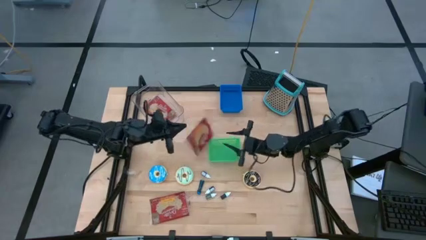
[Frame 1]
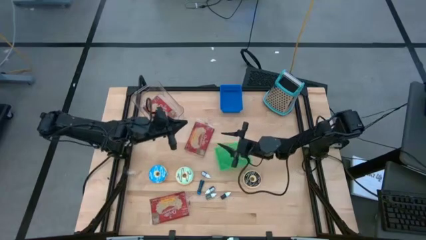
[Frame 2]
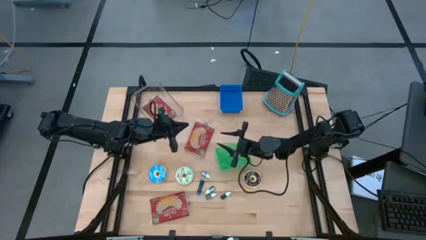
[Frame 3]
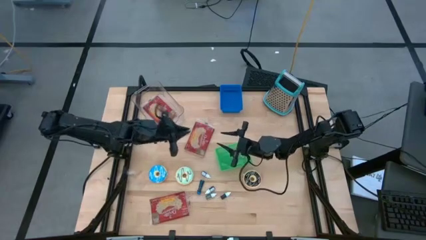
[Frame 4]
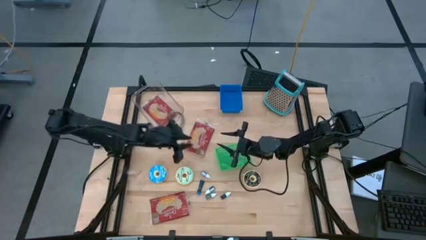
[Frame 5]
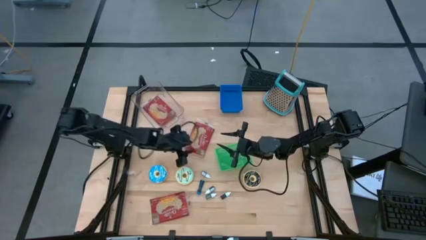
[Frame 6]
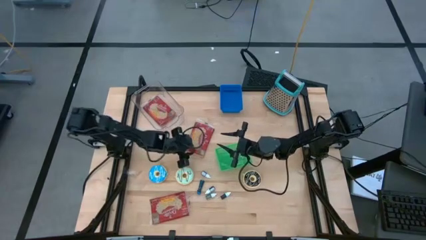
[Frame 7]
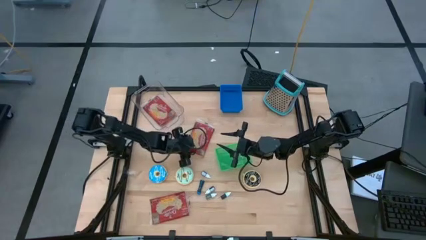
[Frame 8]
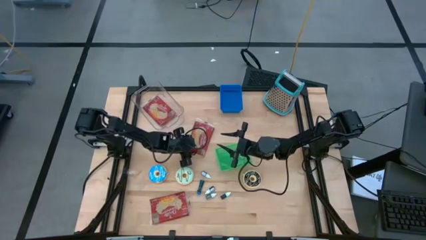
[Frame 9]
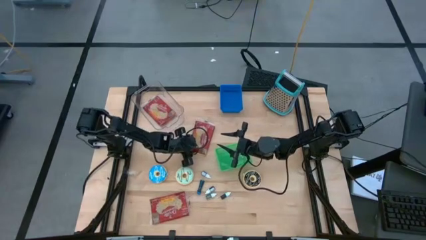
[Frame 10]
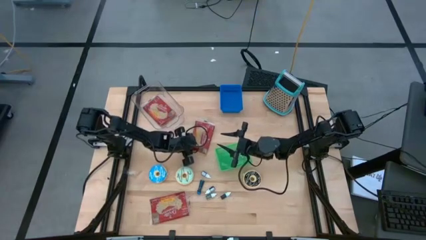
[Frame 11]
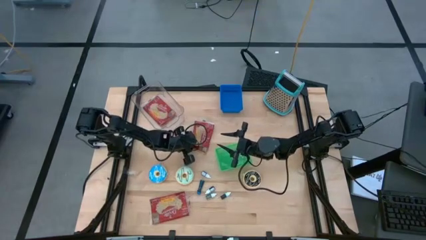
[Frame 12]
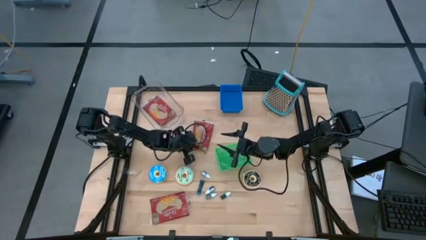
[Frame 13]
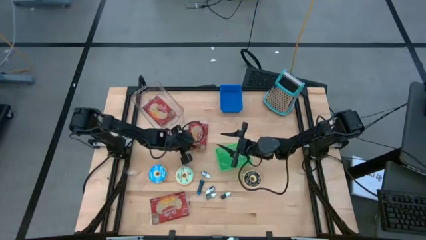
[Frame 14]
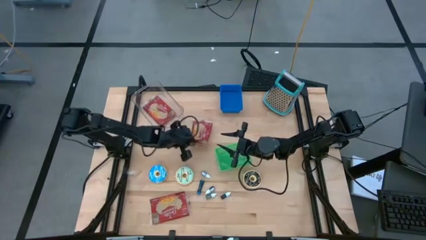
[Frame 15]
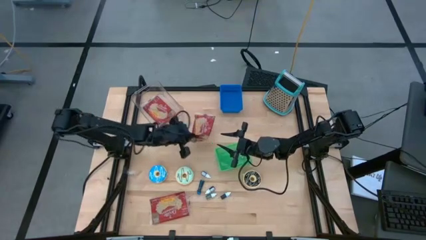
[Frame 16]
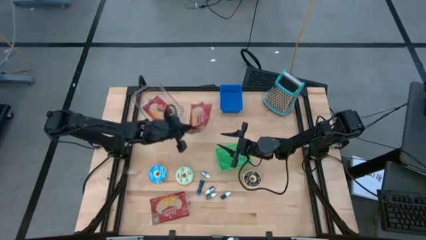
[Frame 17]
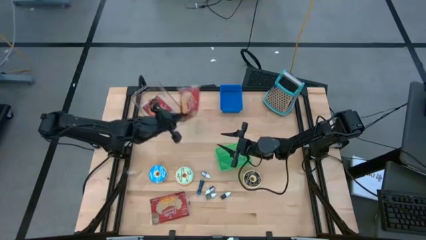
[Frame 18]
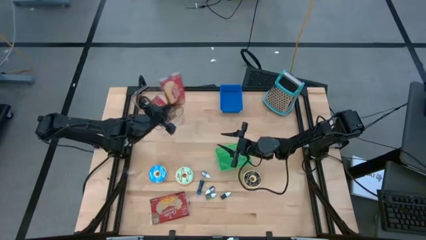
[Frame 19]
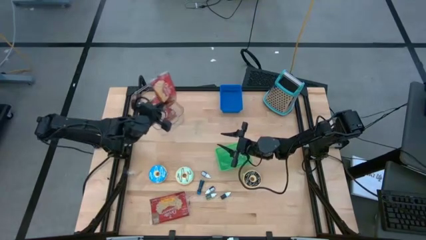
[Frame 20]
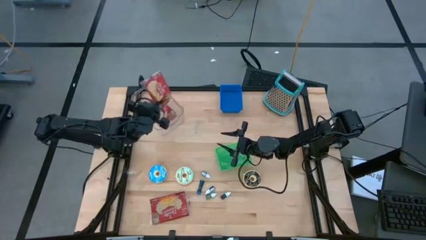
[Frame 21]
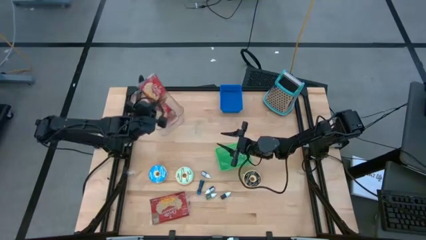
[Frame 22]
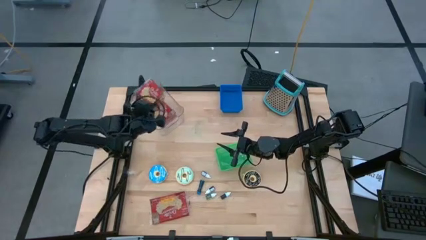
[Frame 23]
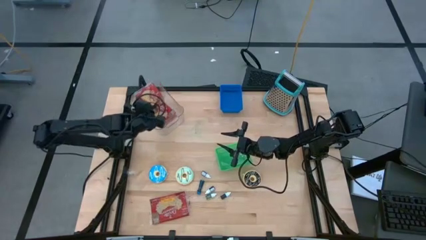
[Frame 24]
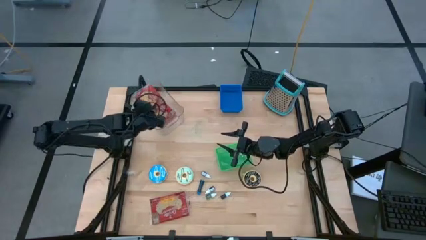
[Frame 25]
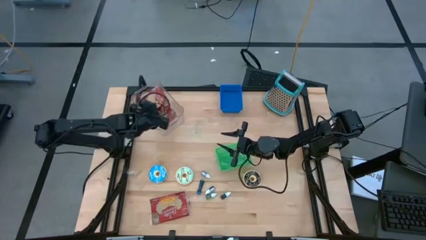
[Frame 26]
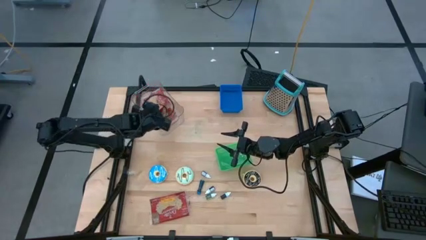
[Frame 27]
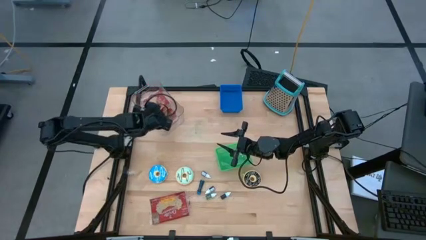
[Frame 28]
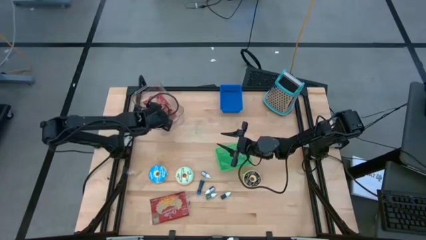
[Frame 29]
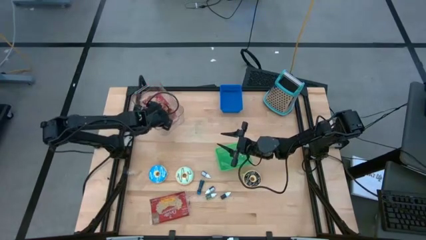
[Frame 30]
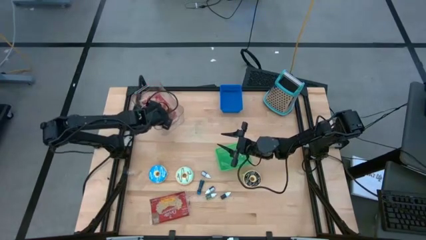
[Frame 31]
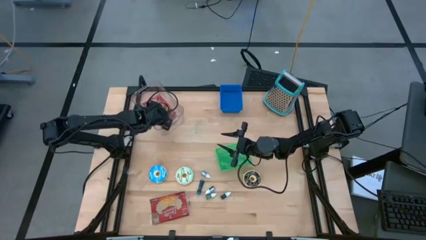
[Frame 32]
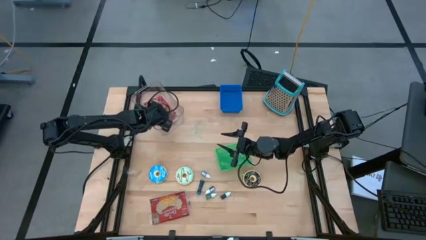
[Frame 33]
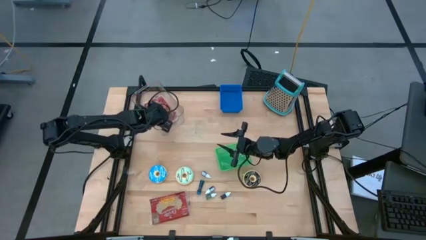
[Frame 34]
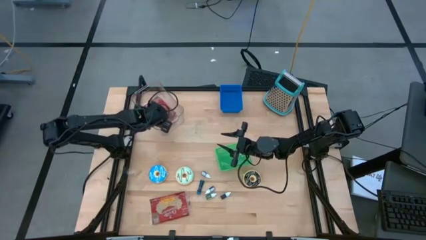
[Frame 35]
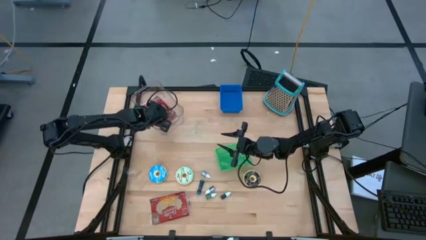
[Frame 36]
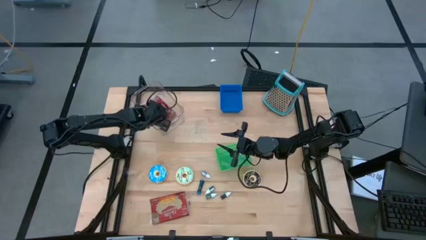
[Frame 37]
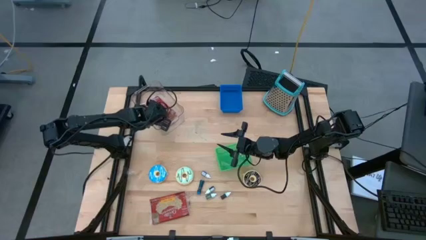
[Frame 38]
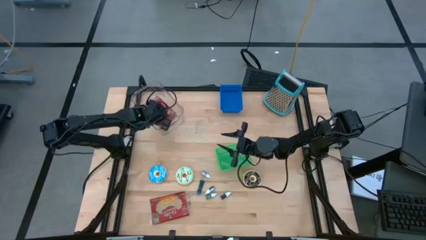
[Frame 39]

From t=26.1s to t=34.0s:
Put the top red popcorn bag into the transparent bin

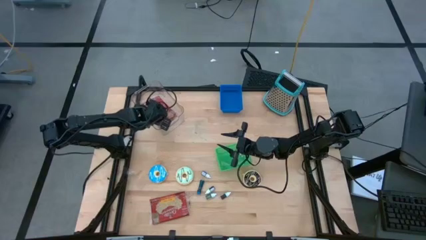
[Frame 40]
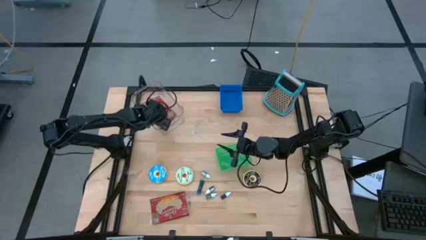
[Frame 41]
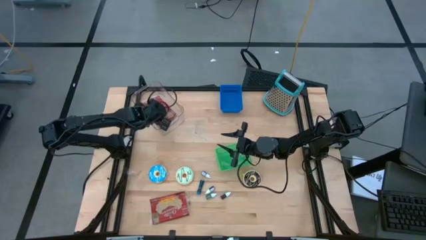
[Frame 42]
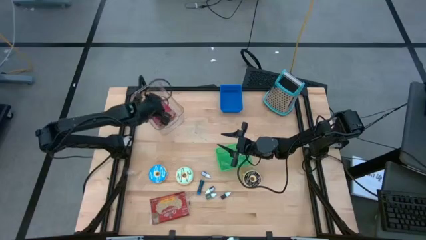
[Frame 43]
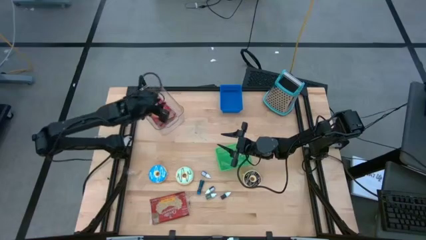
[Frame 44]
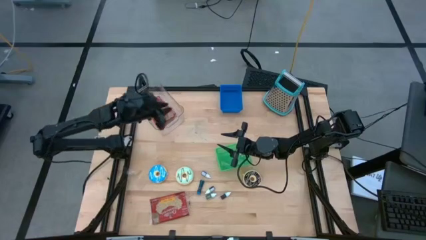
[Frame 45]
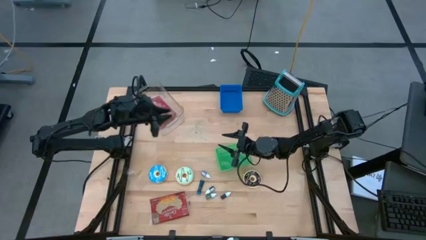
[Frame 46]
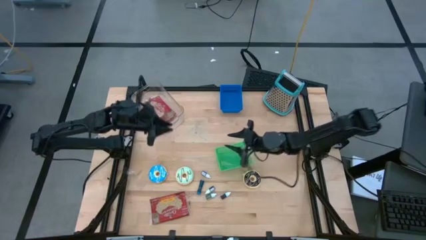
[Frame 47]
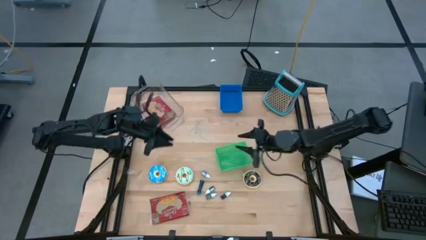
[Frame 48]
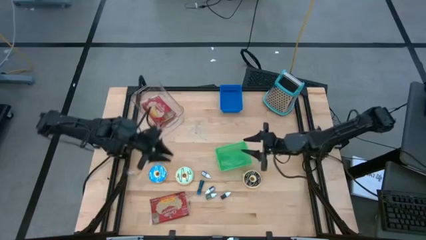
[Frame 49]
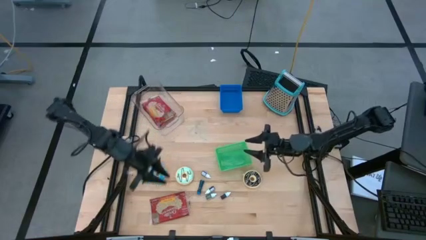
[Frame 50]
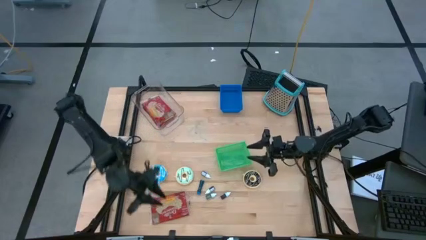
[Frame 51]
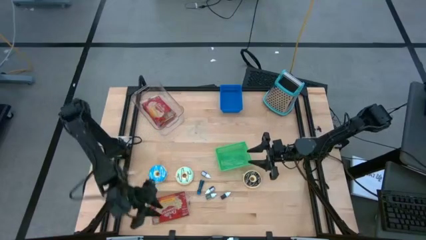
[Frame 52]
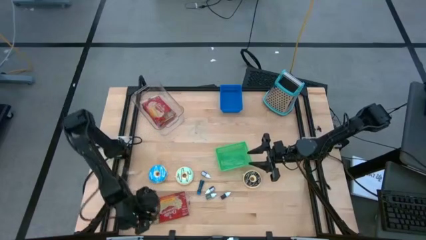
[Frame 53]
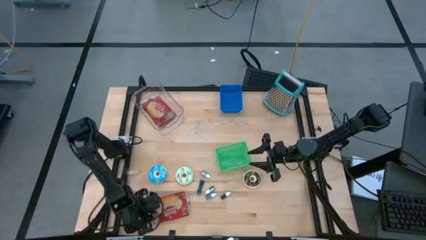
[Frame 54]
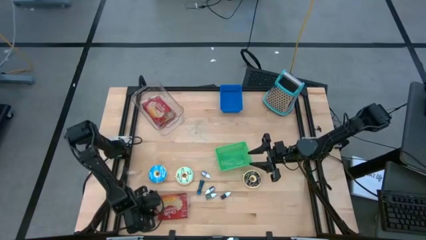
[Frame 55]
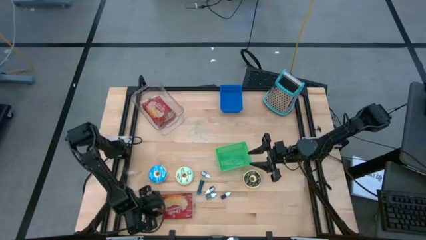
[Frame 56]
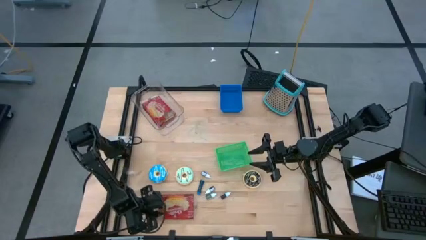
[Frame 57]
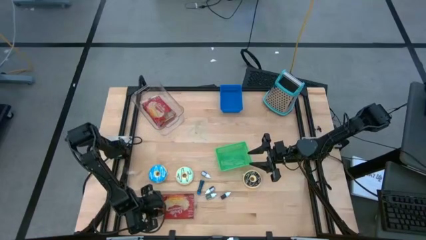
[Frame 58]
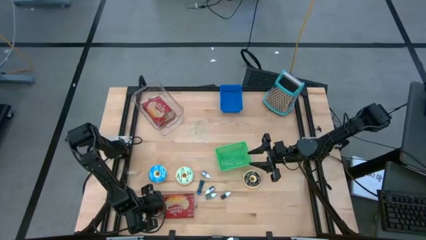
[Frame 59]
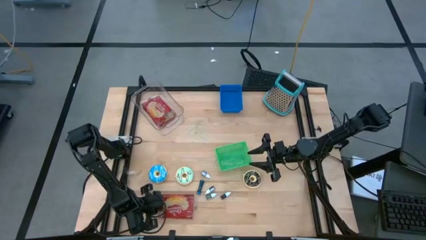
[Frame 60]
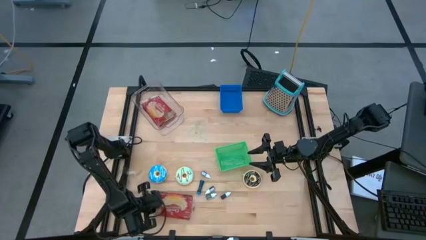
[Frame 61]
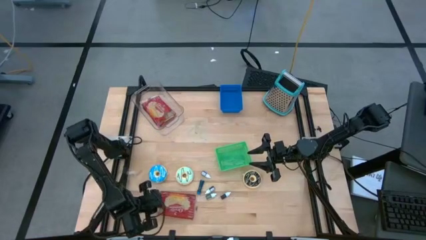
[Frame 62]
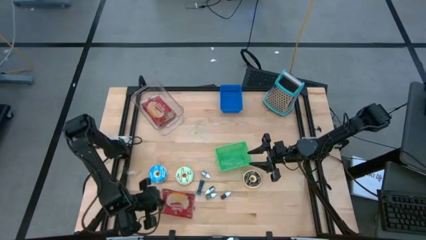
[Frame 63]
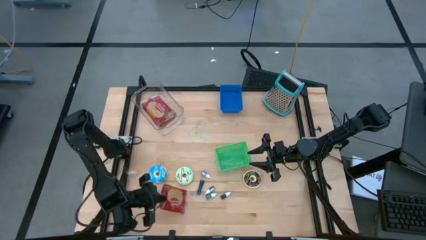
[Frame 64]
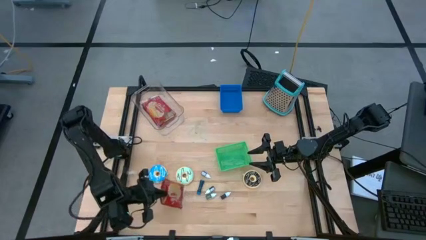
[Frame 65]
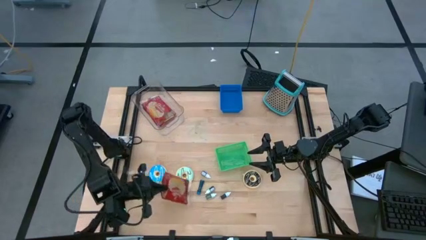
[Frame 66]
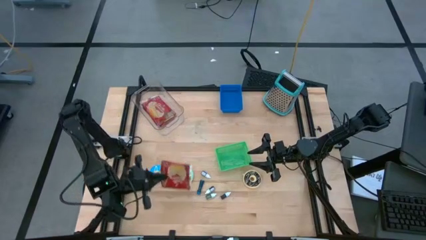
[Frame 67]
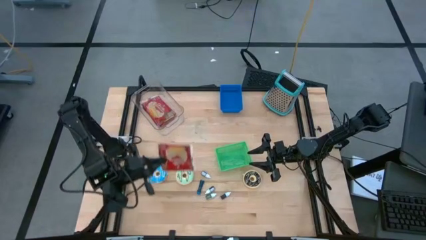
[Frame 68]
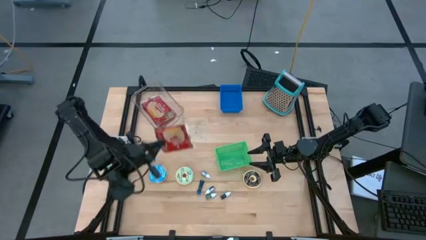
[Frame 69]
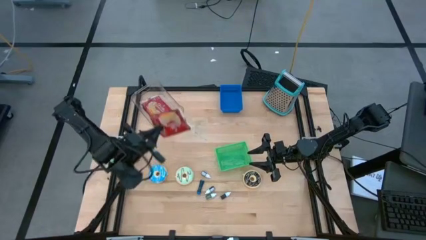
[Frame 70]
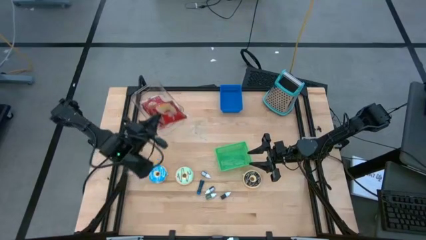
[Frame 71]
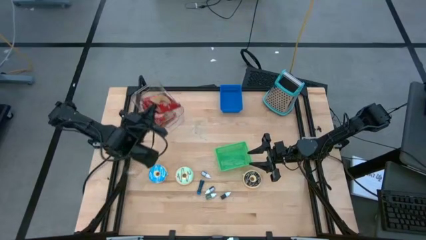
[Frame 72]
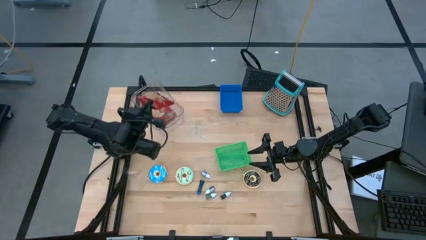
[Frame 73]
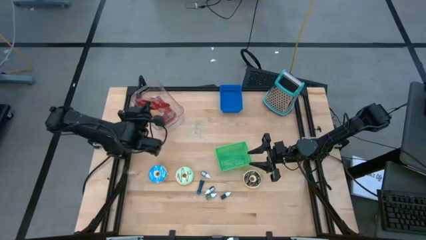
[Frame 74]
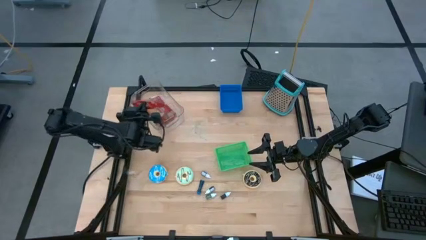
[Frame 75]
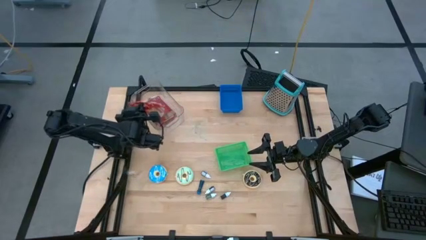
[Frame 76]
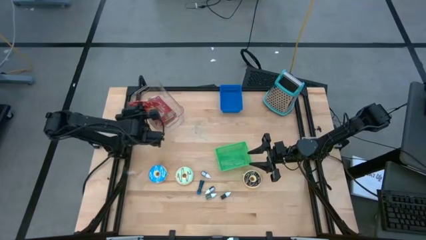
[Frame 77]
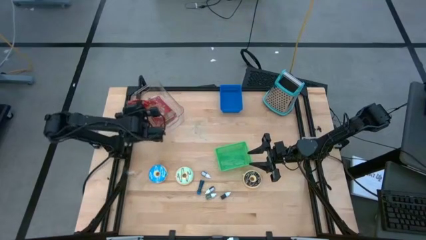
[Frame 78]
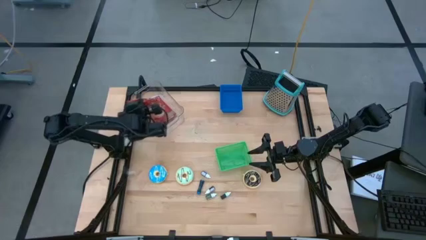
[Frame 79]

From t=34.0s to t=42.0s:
Put the red popcorn bag into the transparent bin
